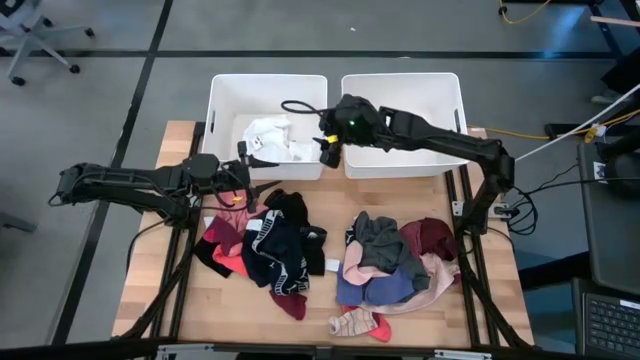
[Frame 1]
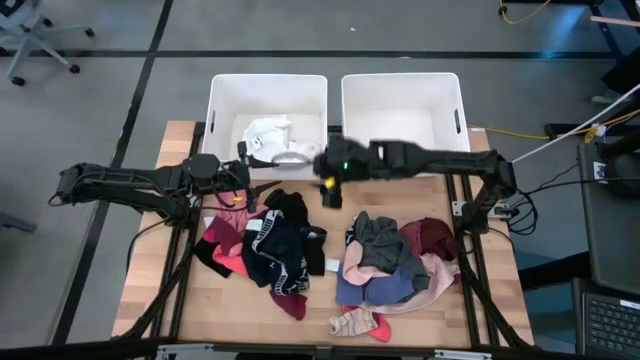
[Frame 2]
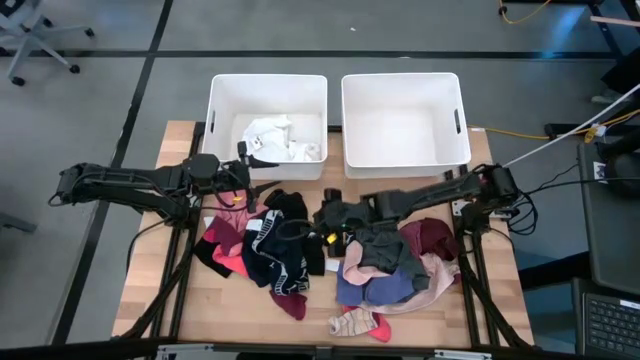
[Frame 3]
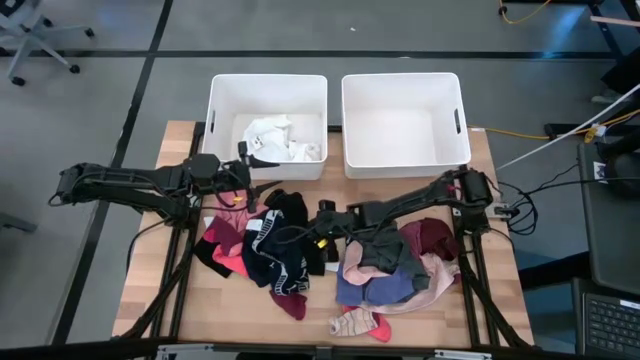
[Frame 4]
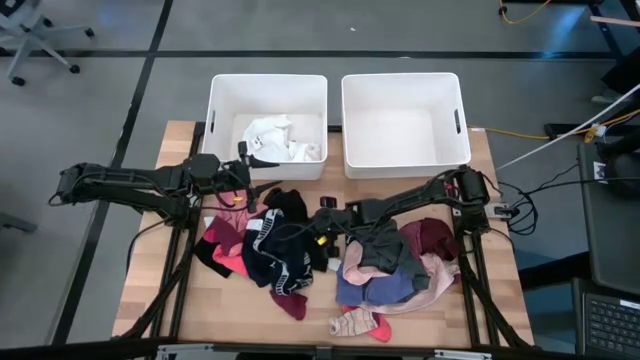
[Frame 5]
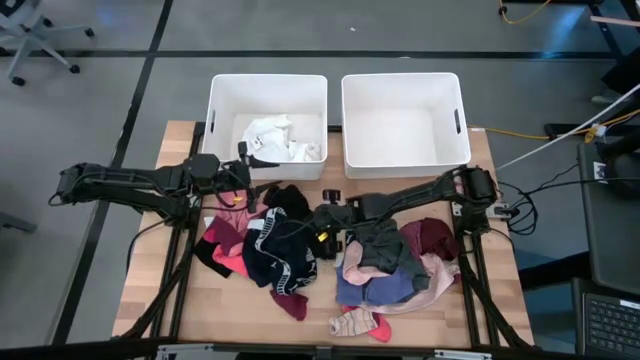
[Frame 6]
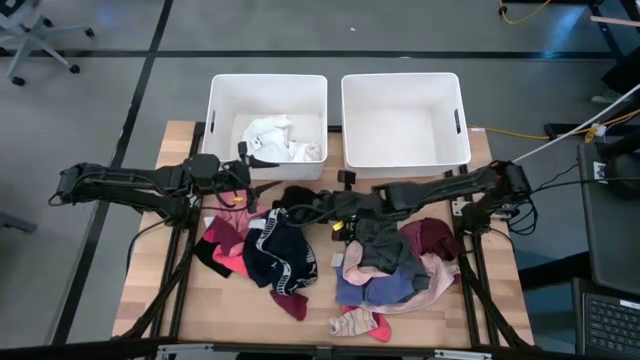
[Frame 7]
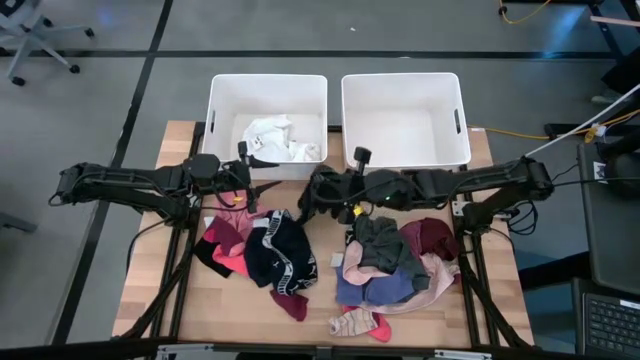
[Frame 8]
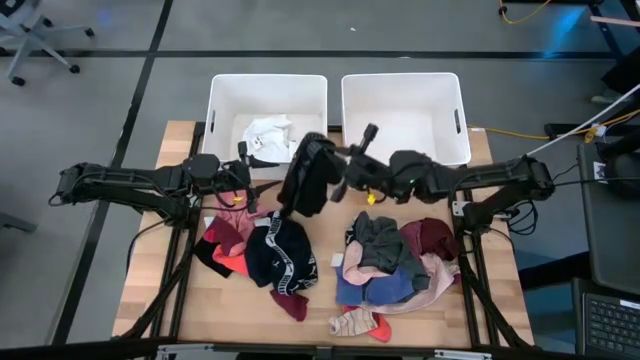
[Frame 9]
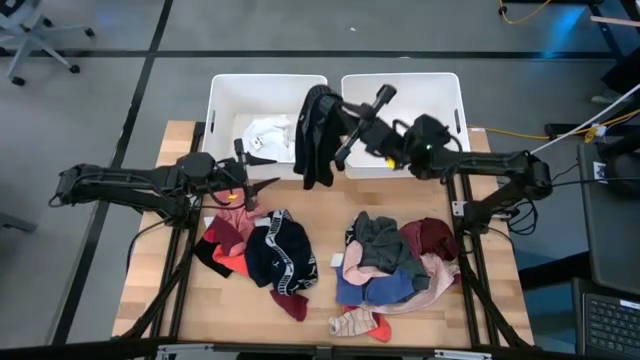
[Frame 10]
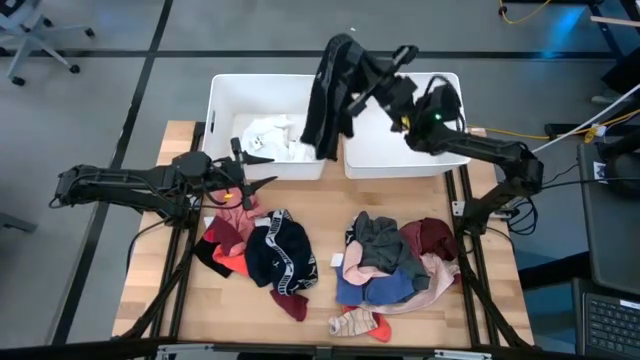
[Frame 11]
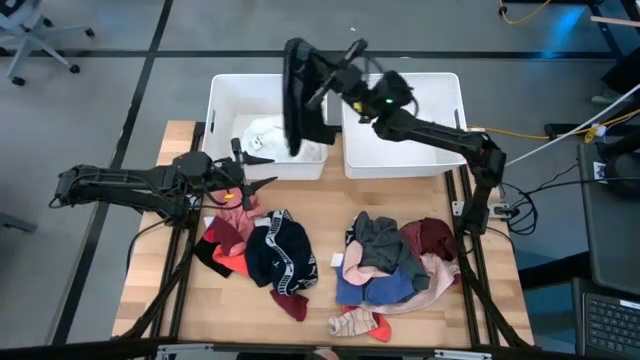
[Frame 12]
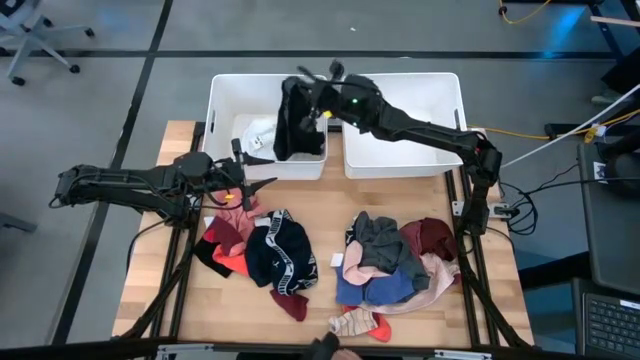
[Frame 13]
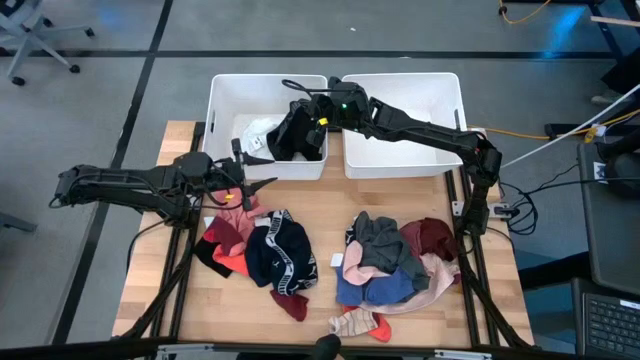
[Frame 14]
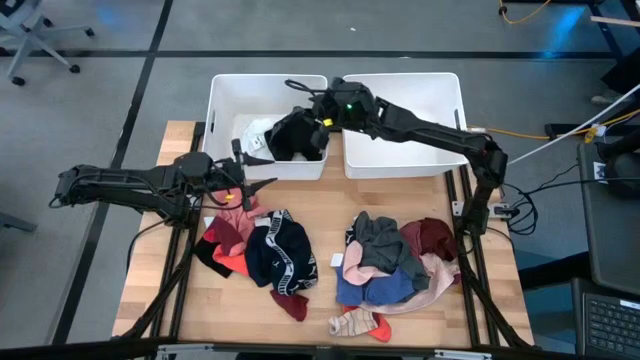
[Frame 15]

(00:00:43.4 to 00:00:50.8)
Task: Sort clothes
Put the top black boxer into the left white laundry bin

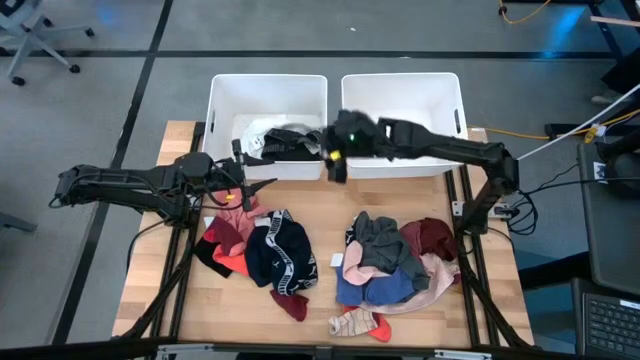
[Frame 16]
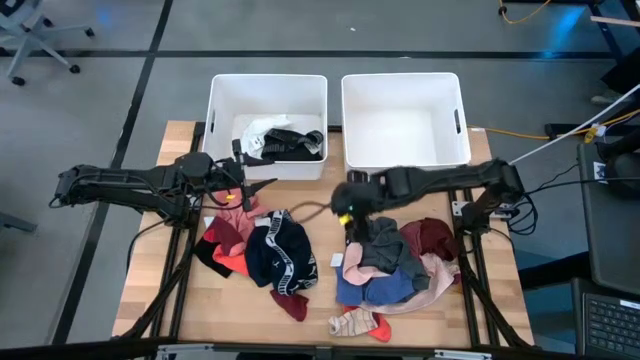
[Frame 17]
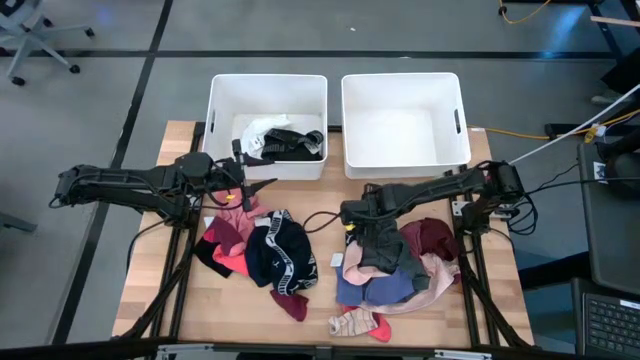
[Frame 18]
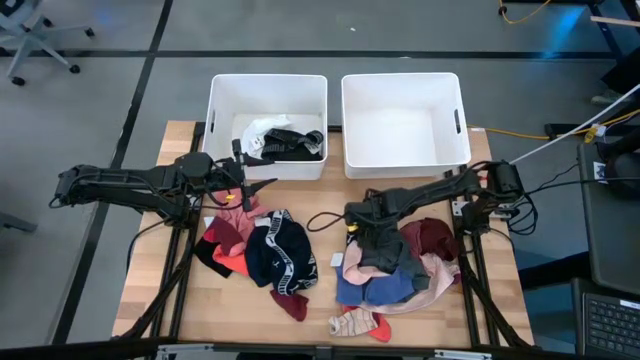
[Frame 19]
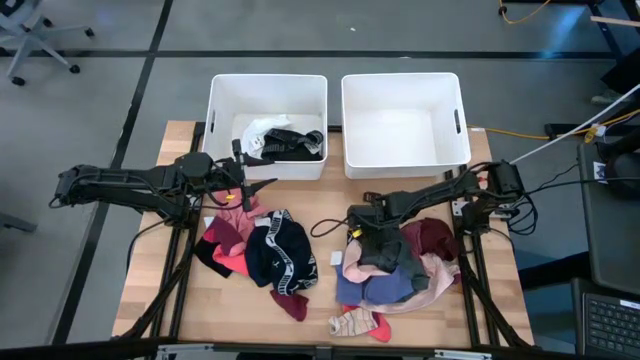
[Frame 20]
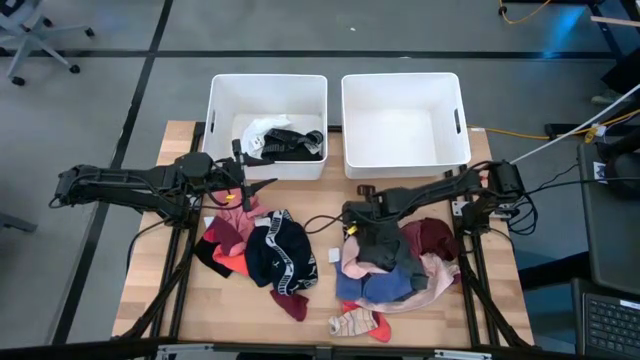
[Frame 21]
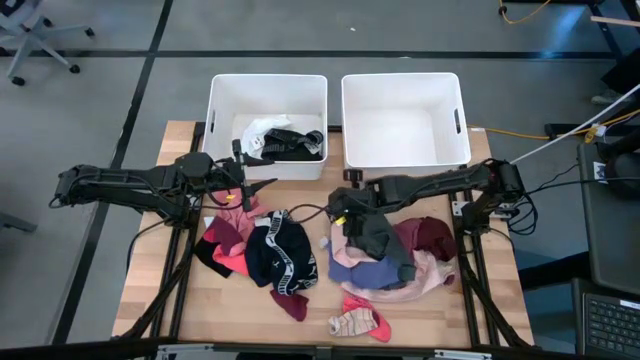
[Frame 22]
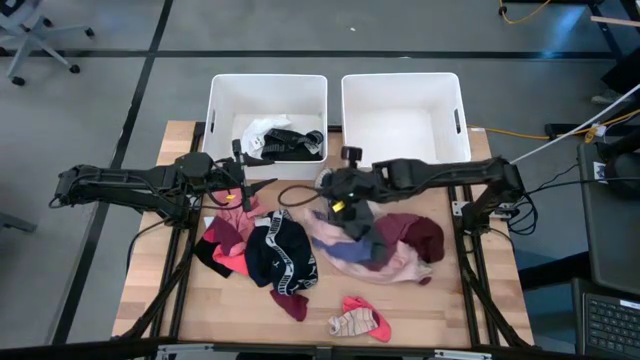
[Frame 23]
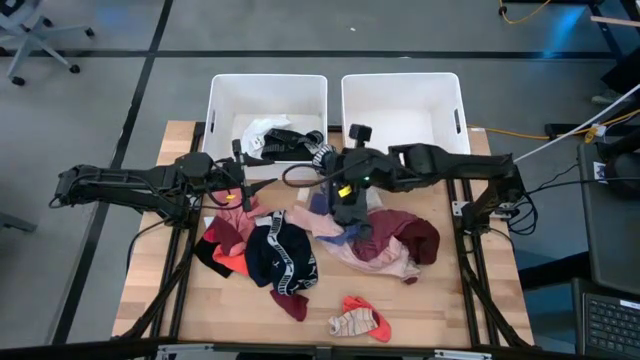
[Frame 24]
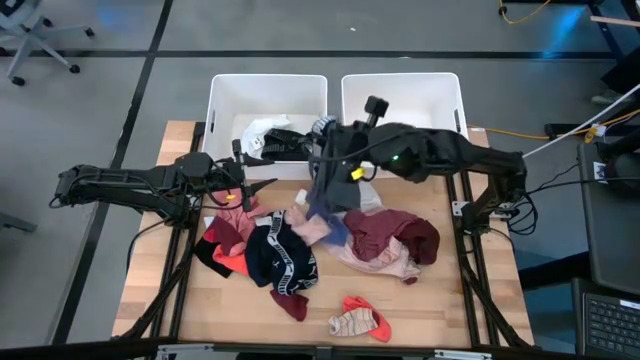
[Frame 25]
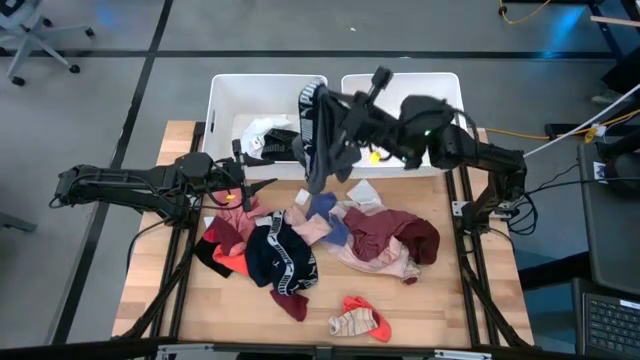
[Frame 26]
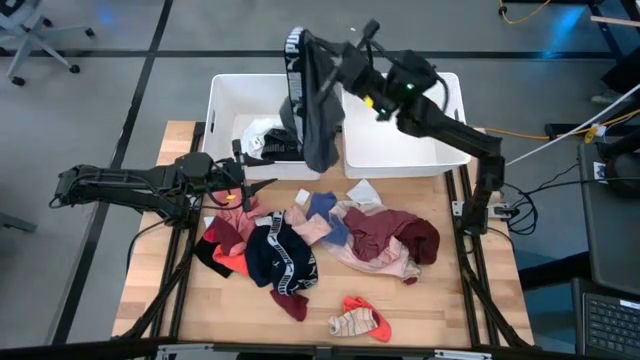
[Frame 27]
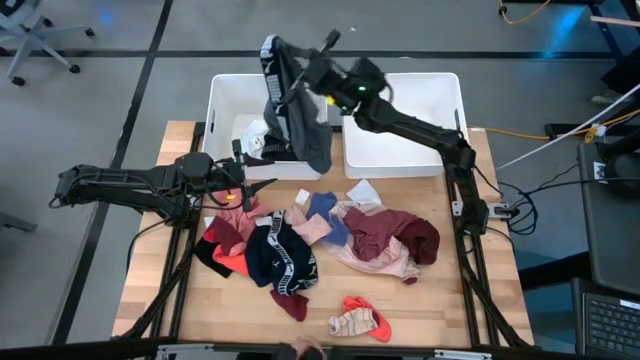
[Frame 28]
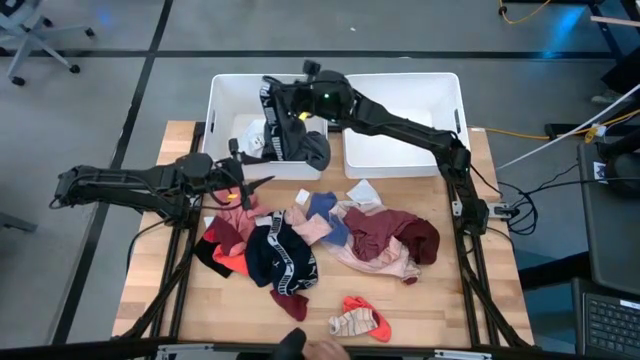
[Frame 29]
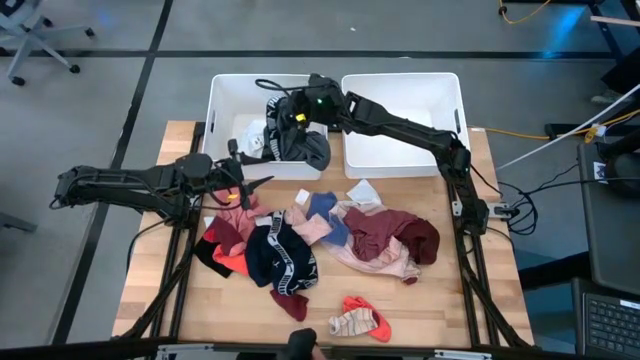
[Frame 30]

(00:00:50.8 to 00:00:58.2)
Put the gray boxer into the left white laundry bin

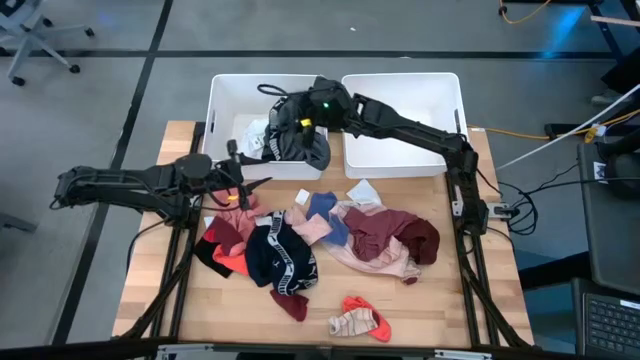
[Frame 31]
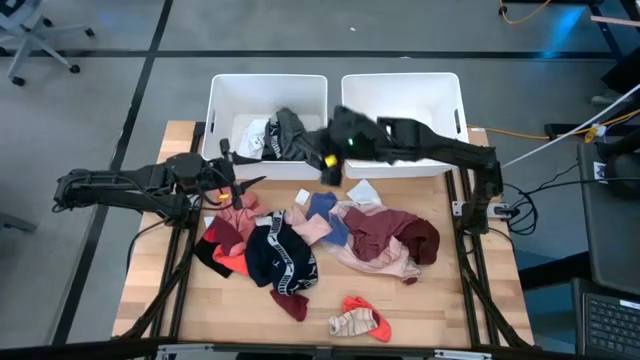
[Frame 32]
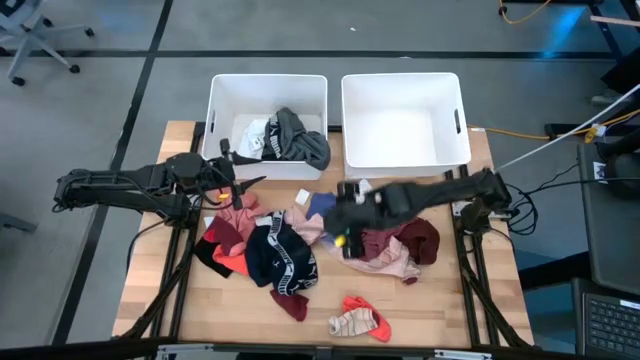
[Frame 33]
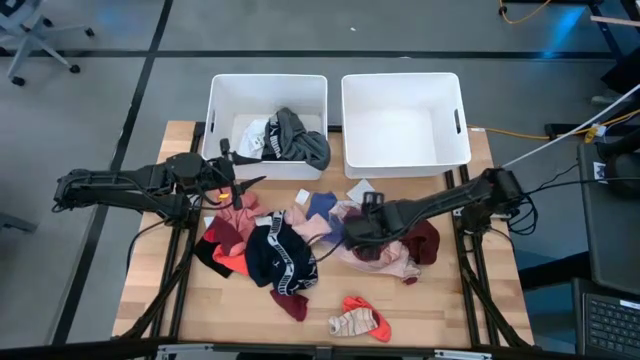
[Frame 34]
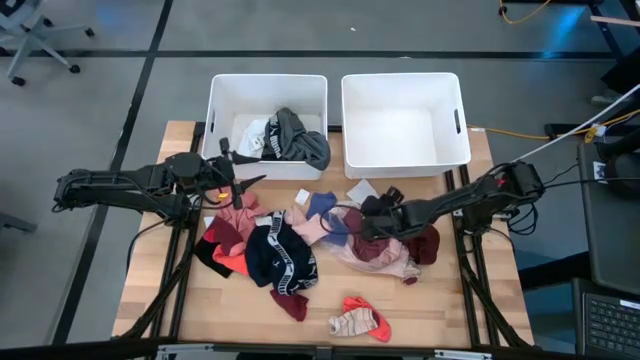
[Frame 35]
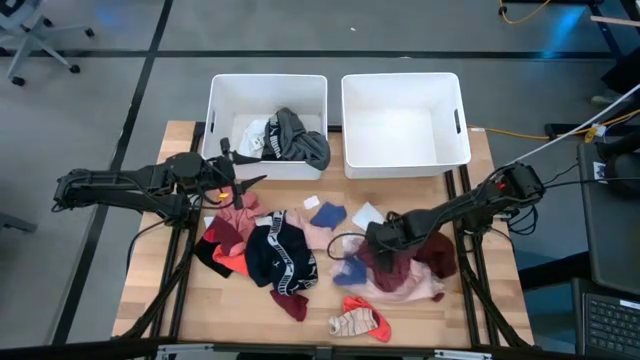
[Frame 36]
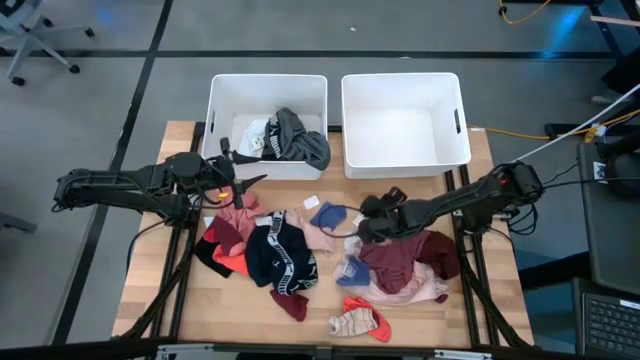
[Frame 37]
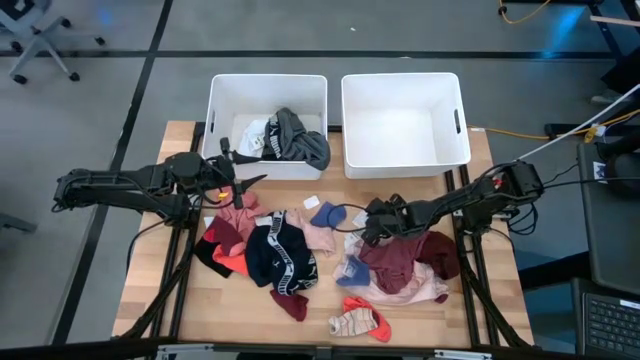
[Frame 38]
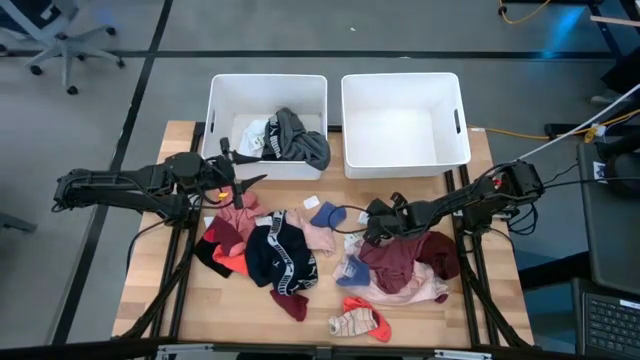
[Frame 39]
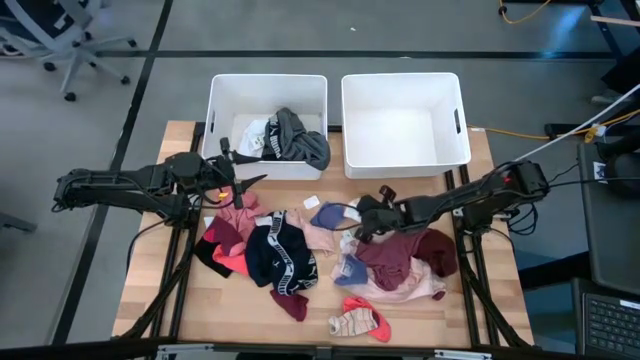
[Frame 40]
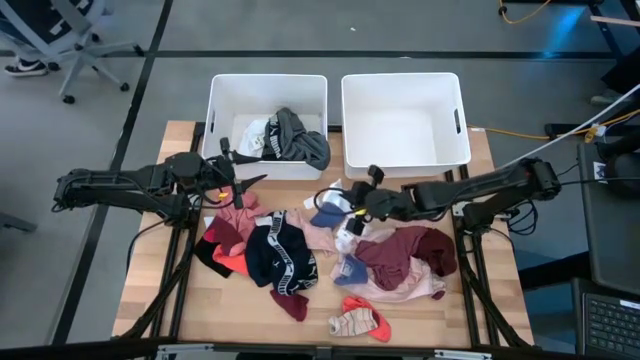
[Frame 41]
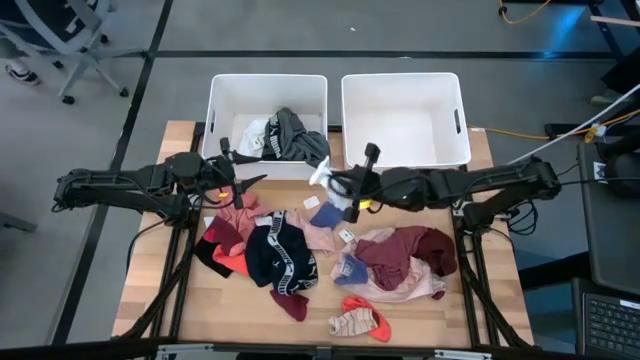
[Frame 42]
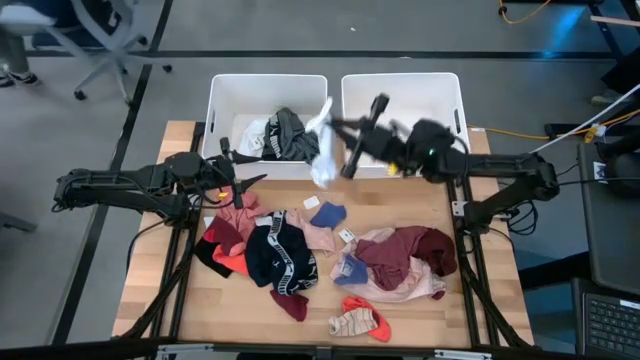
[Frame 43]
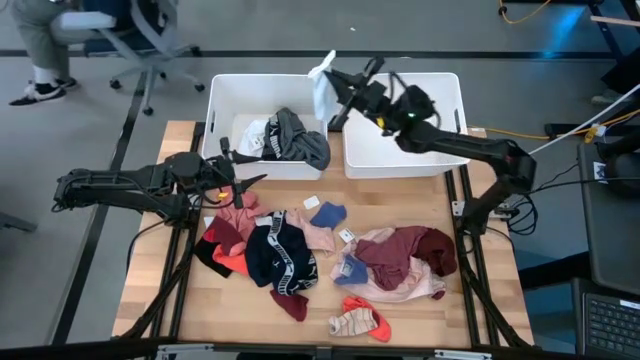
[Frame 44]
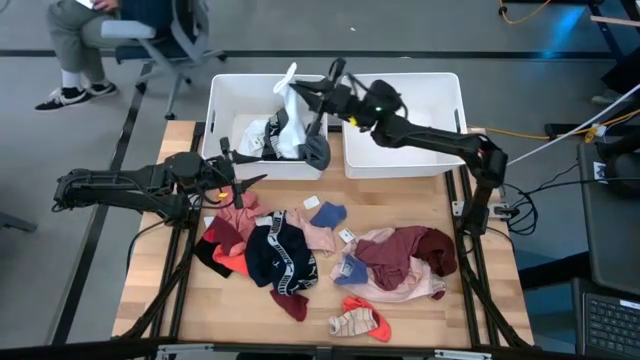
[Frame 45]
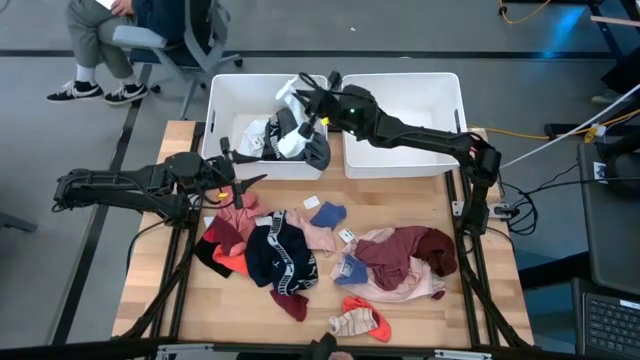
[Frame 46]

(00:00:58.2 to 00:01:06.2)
Put the white sock into the left white laundry bin
